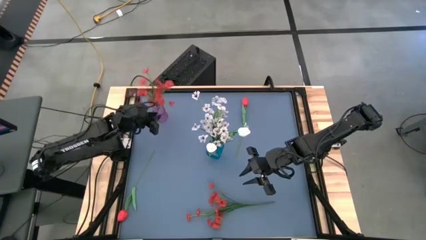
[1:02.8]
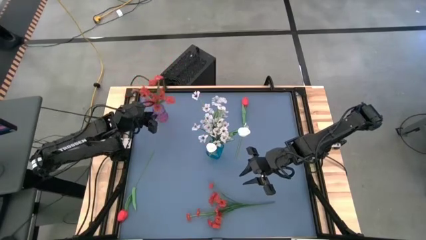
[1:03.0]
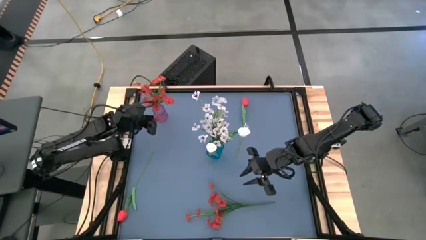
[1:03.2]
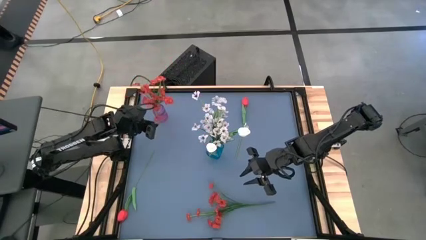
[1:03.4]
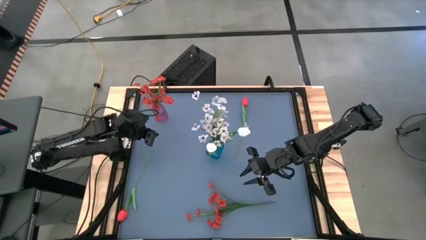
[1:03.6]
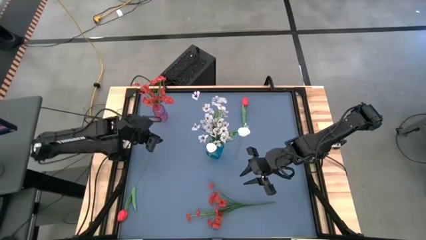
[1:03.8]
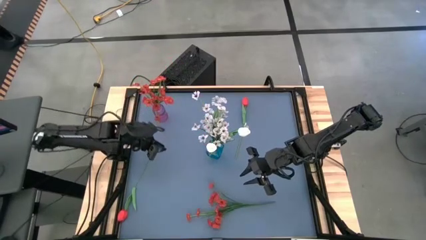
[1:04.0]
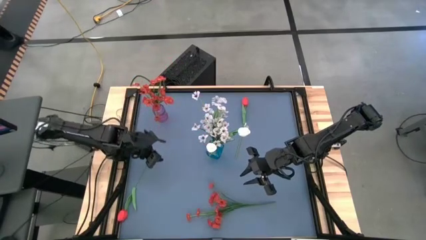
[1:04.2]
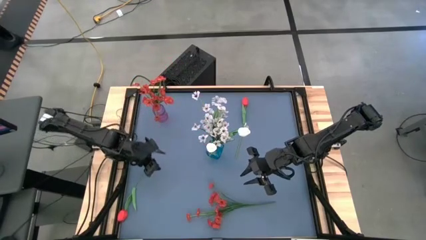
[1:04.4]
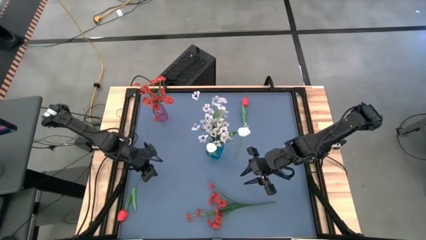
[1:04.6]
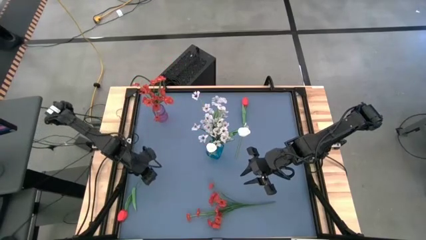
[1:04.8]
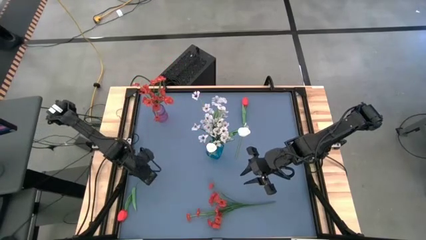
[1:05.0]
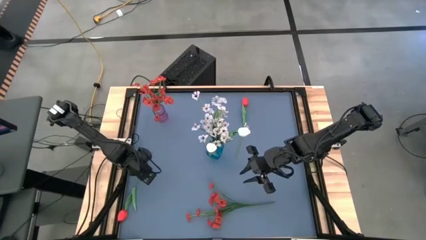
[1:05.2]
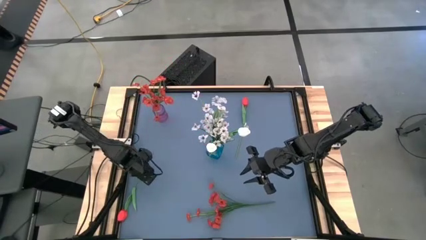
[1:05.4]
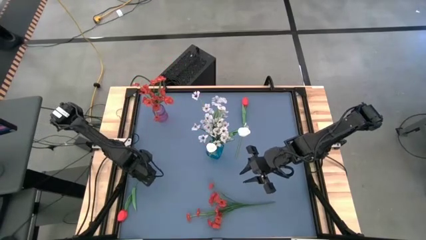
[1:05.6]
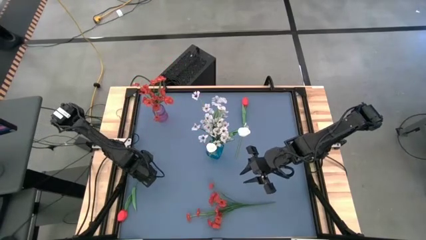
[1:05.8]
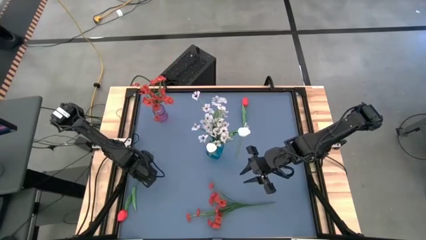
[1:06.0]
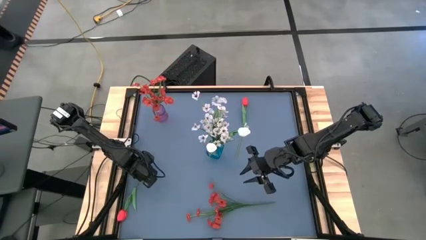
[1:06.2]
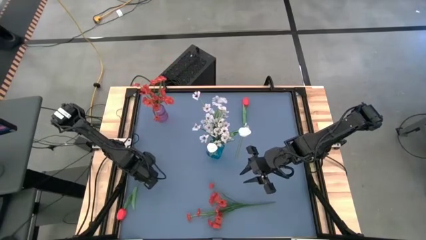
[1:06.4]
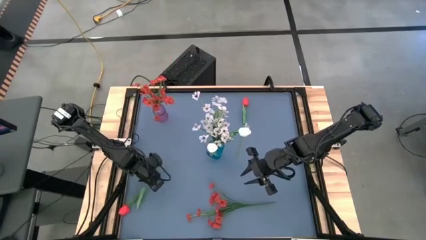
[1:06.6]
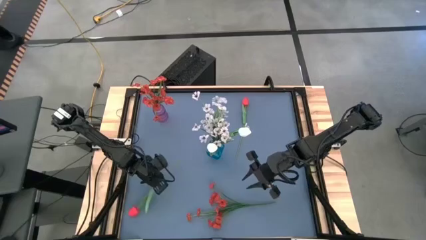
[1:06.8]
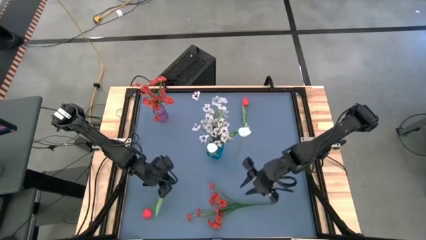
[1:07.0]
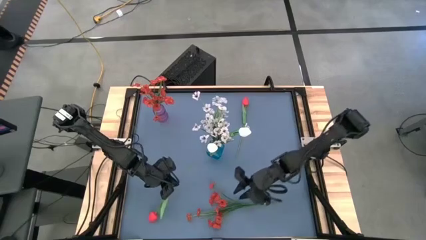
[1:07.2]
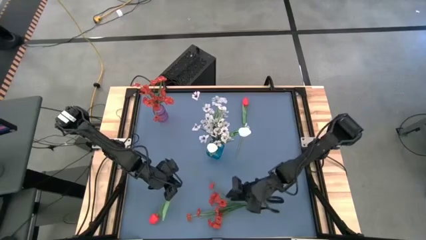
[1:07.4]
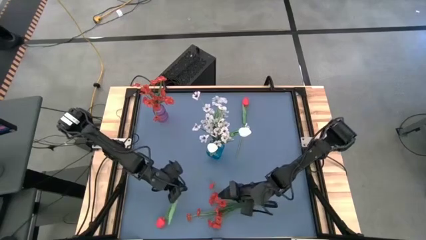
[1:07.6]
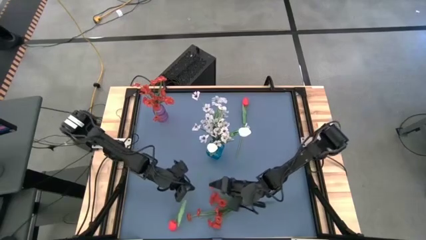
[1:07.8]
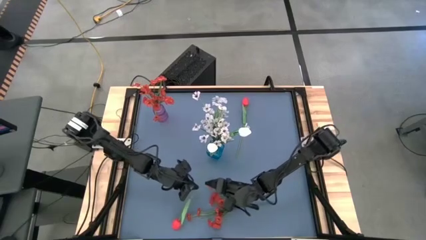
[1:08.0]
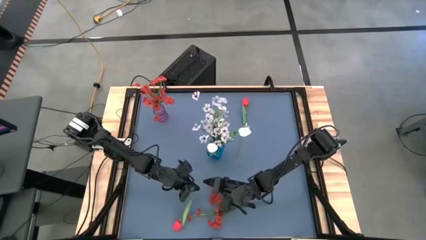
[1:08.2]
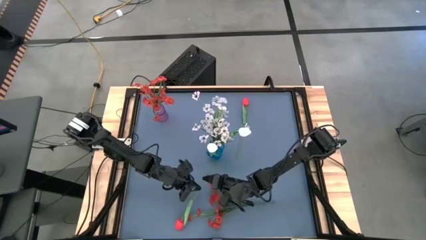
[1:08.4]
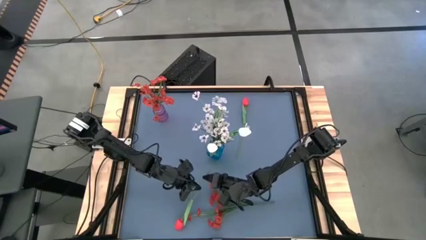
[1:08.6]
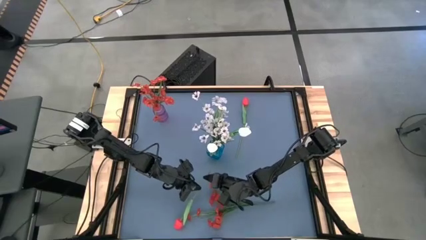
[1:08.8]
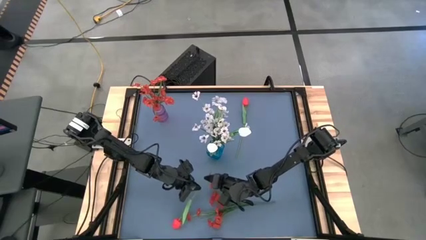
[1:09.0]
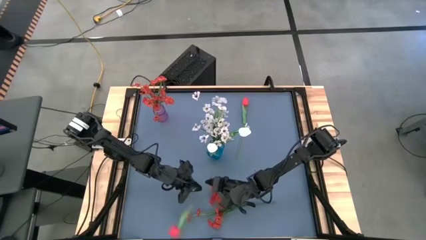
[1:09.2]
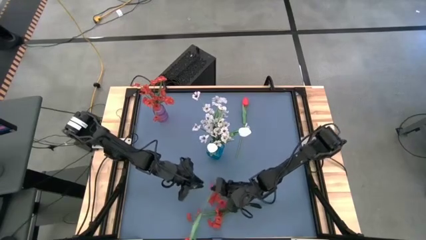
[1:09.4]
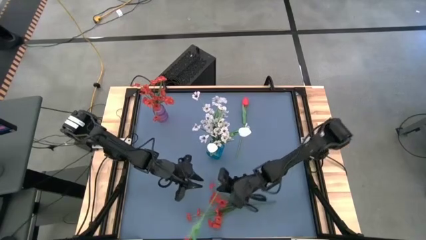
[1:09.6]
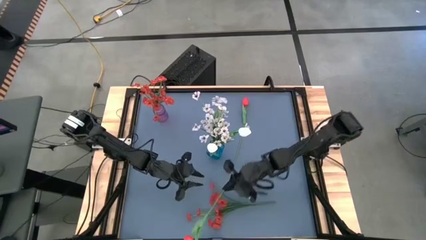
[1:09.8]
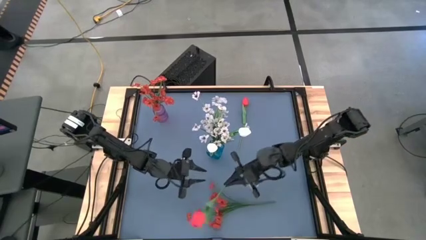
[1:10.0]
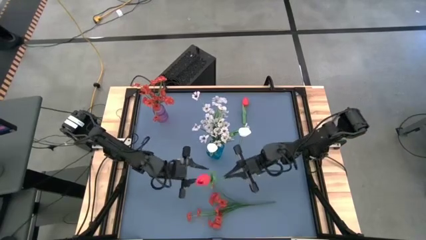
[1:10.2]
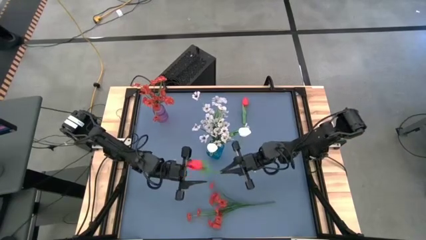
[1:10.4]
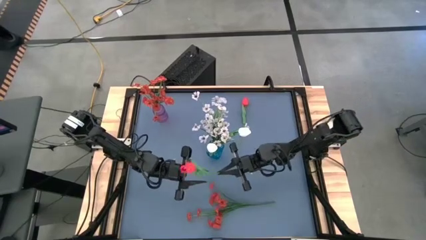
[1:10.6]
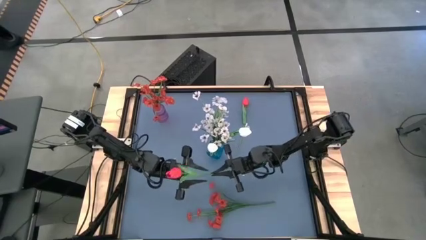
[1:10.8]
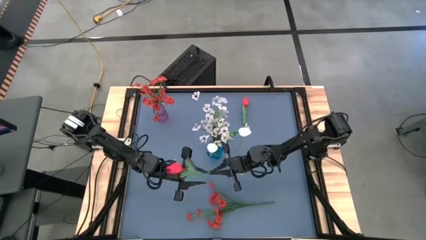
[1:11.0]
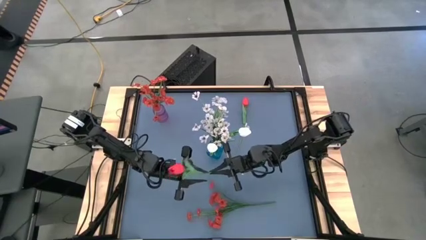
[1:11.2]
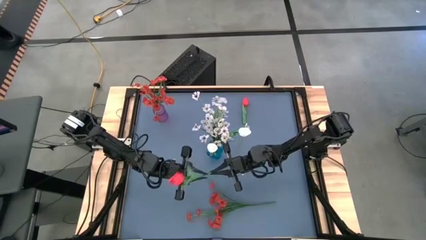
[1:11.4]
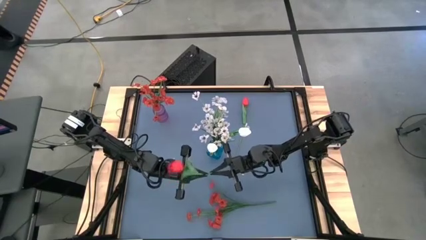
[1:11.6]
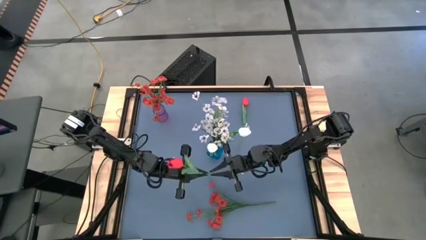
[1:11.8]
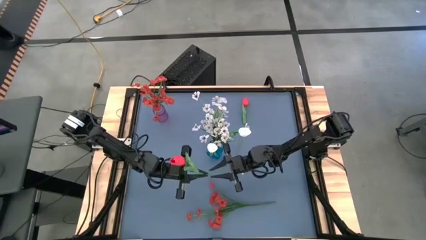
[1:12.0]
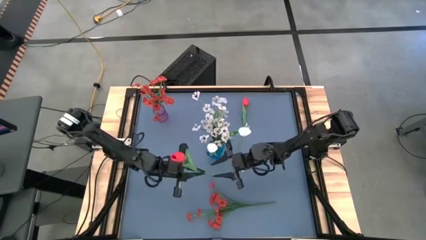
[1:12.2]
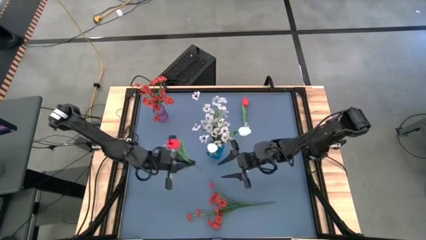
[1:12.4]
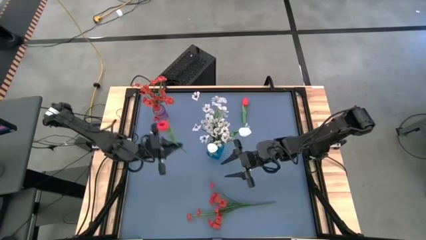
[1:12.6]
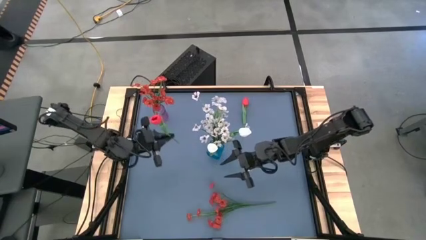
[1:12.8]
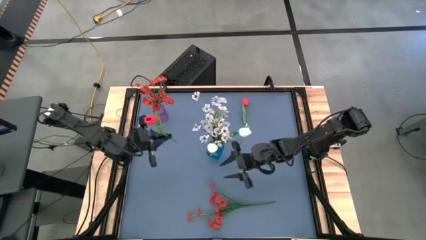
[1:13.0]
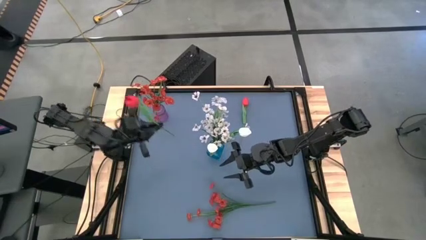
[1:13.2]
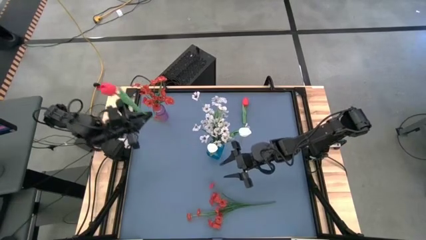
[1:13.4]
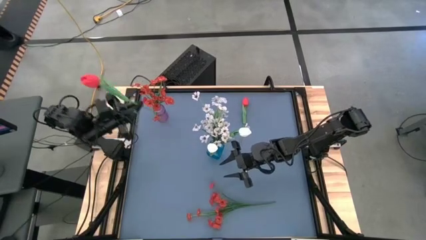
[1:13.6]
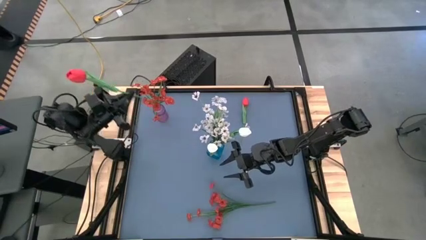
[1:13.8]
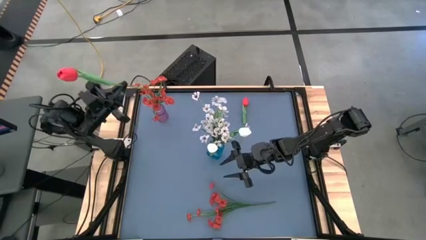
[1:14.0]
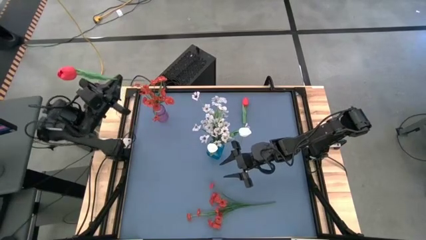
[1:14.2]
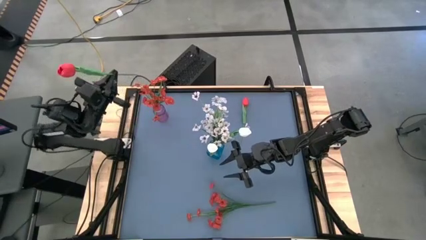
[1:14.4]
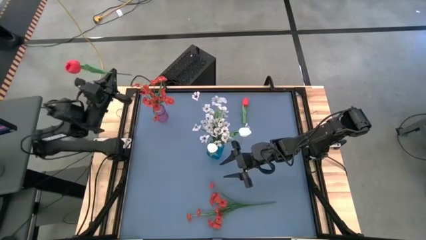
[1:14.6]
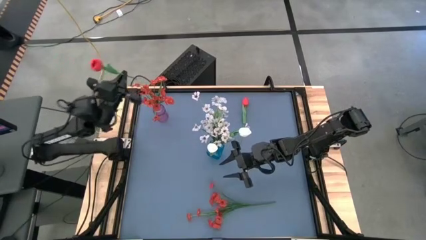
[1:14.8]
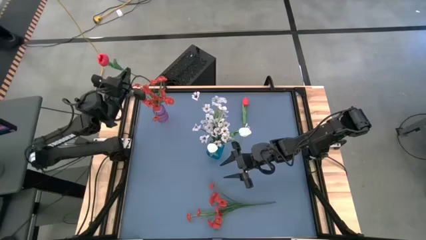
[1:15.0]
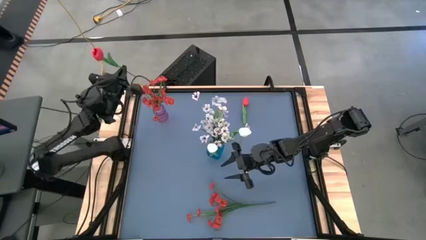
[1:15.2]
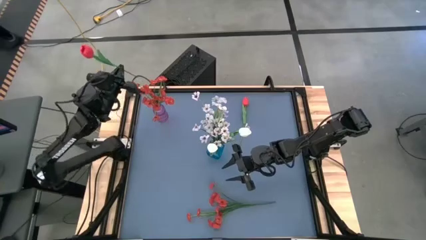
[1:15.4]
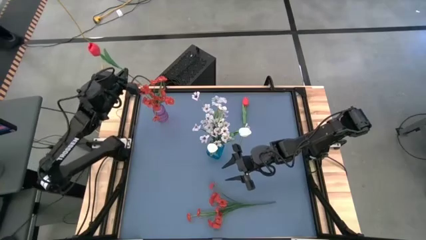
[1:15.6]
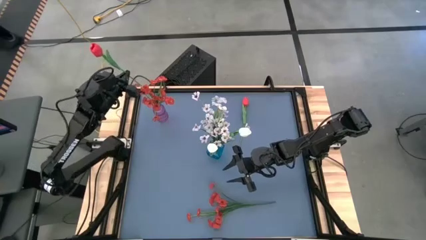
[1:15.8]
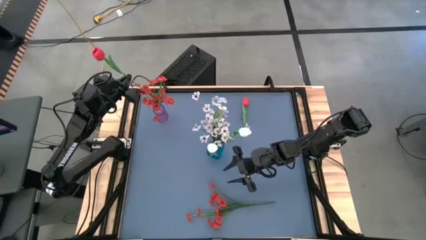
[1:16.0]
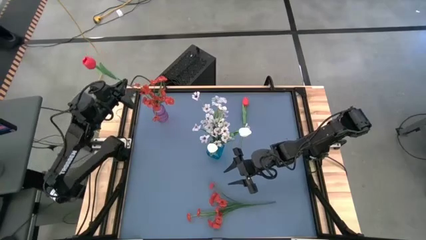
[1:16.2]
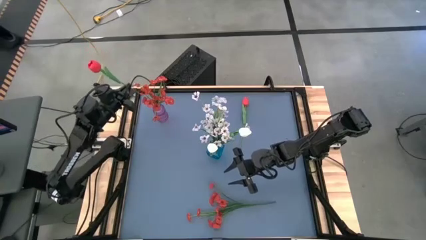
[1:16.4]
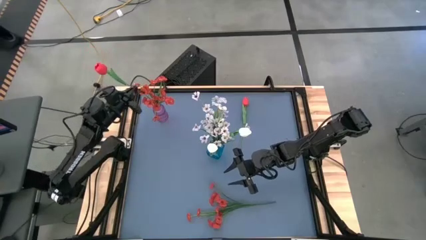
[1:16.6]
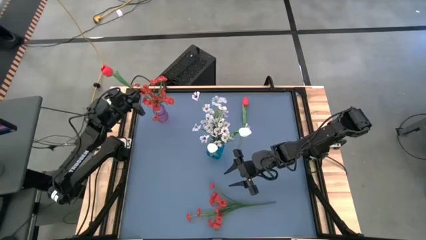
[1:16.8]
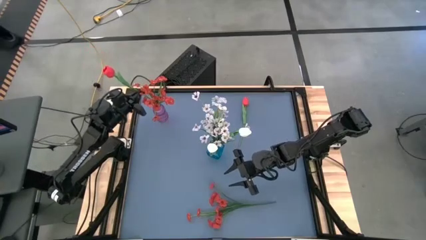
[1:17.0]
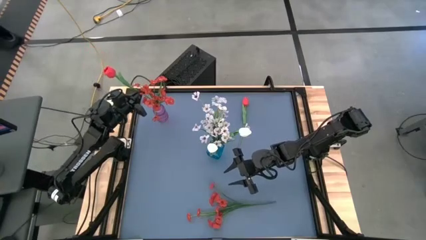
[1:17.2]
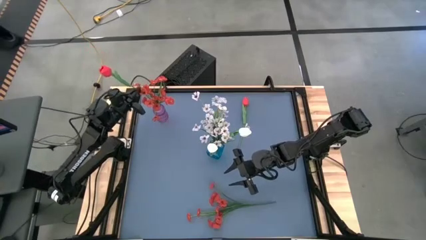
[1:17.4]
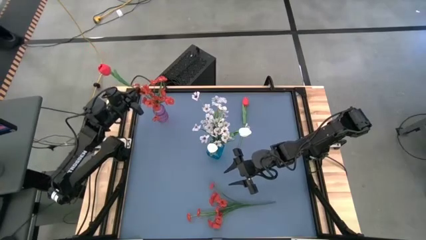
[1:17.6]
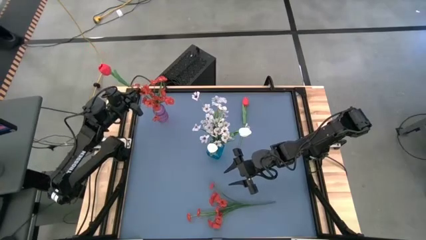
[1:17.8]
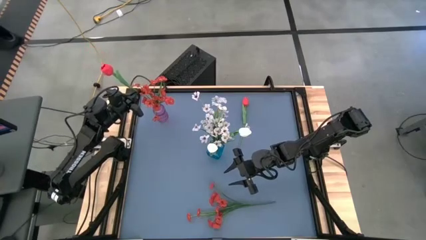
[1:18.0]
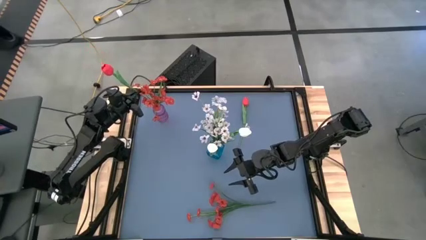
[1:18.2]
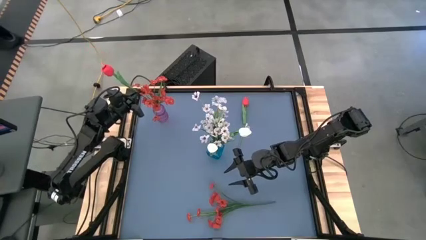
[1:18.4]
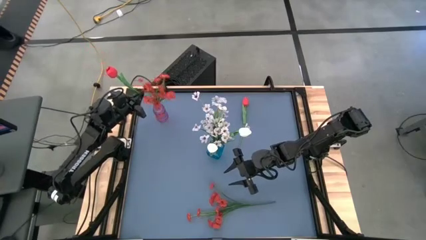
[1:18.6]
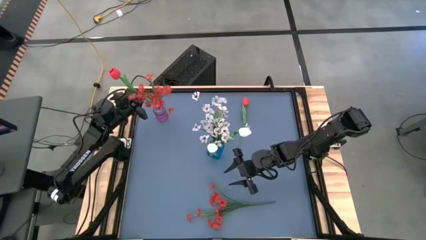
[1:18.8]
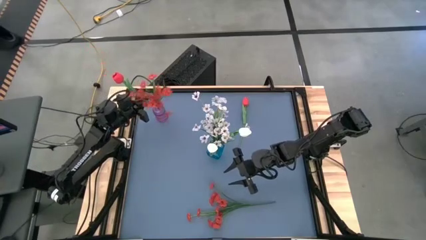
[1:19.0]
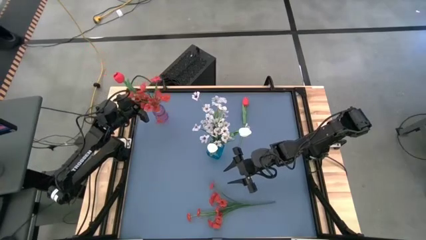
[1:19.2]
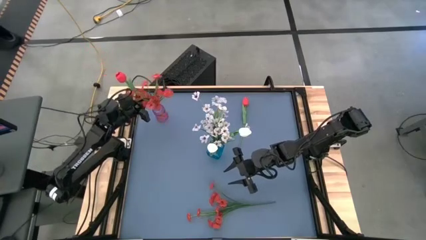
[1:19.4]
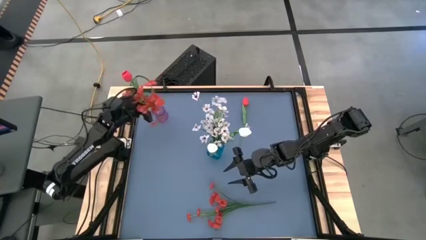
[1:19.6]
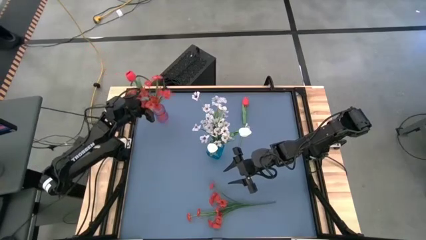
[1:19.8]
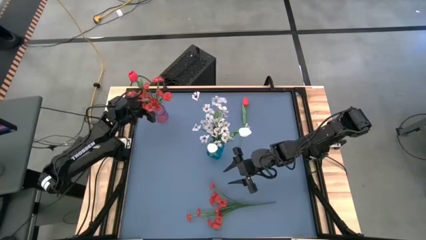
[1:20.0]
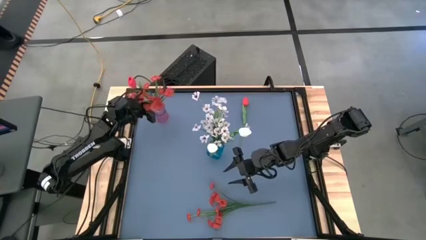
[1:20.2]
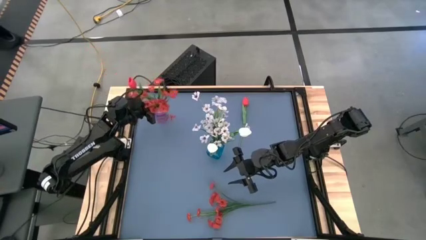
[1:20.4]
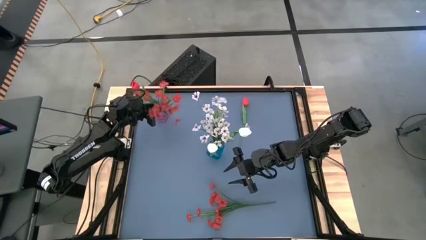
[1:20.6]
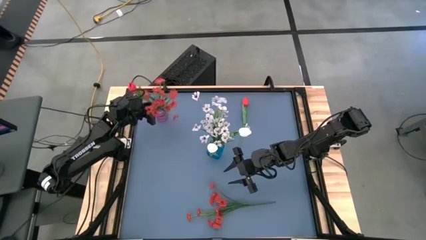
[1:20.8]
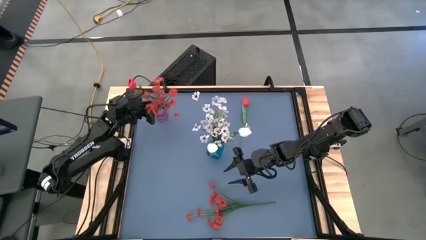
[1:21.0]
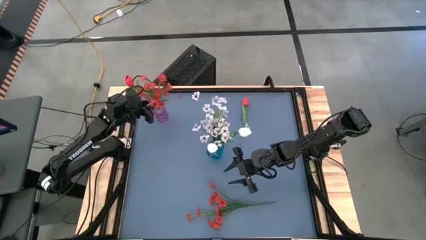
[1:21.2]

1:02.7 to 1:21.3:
Task: Sort flowers into vase by color
Put the bottom red flower into the purple vase
